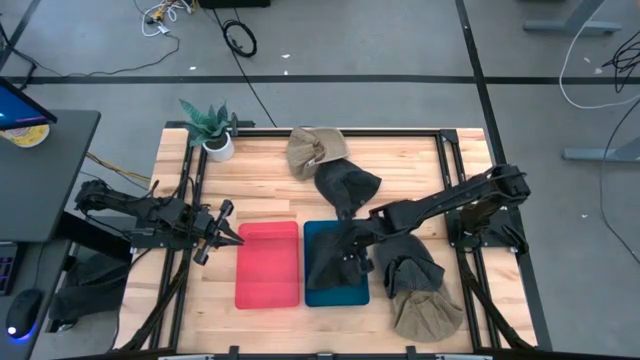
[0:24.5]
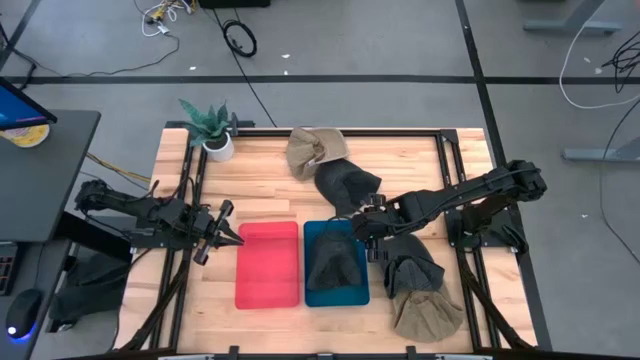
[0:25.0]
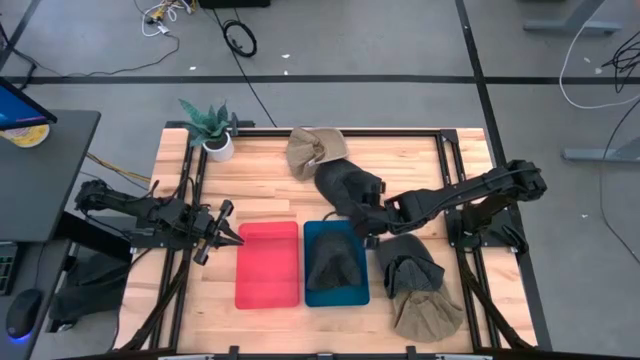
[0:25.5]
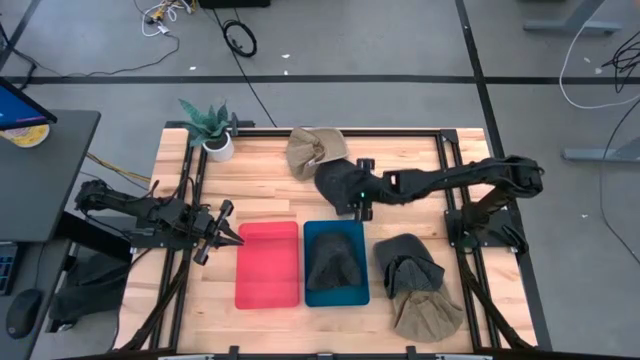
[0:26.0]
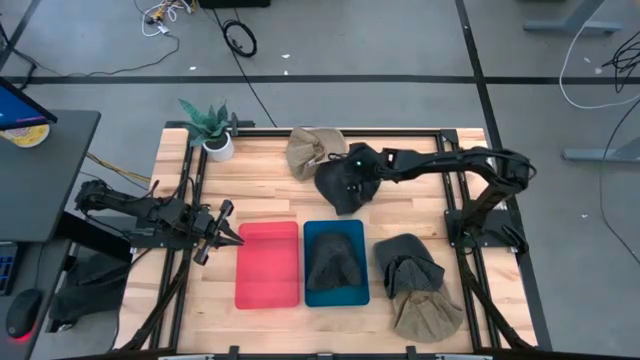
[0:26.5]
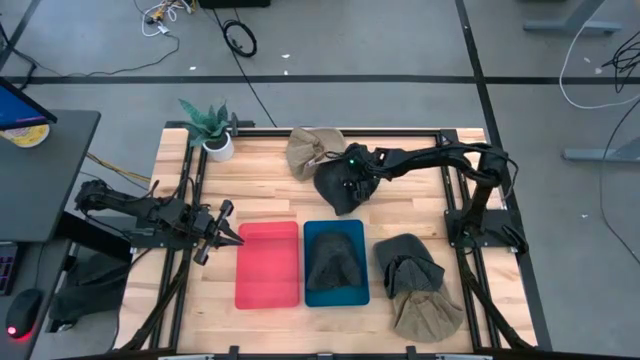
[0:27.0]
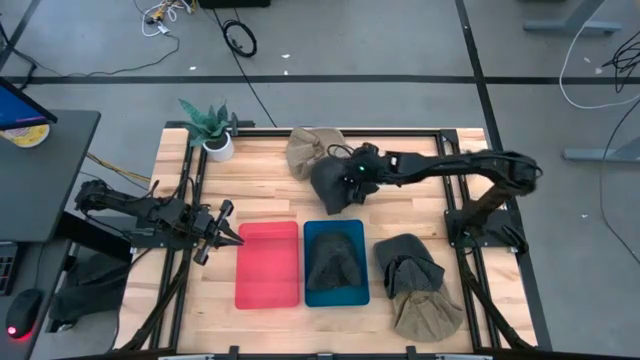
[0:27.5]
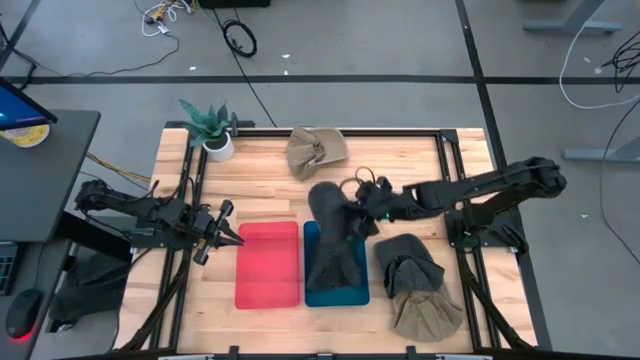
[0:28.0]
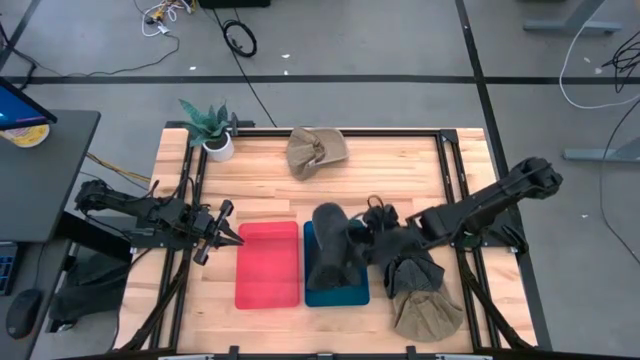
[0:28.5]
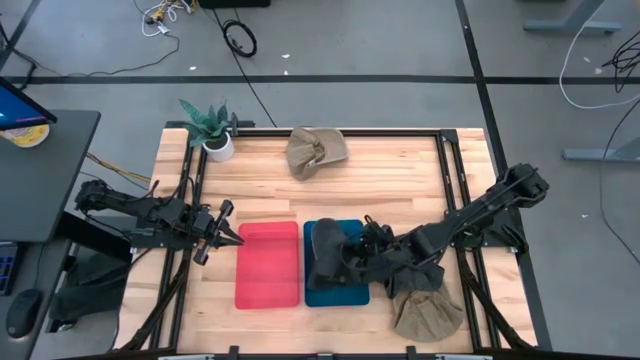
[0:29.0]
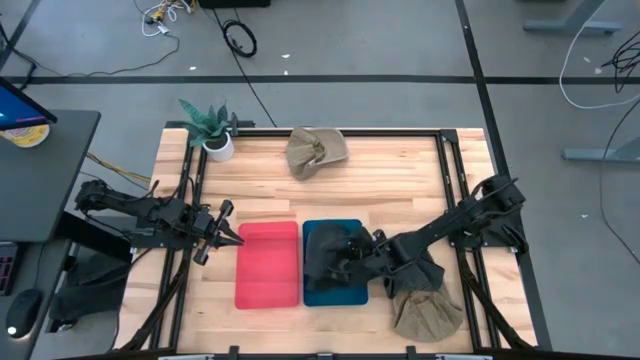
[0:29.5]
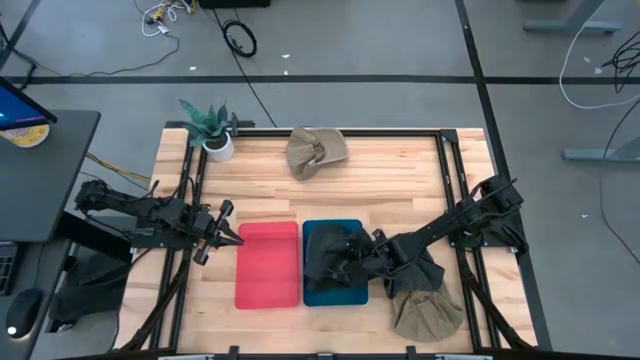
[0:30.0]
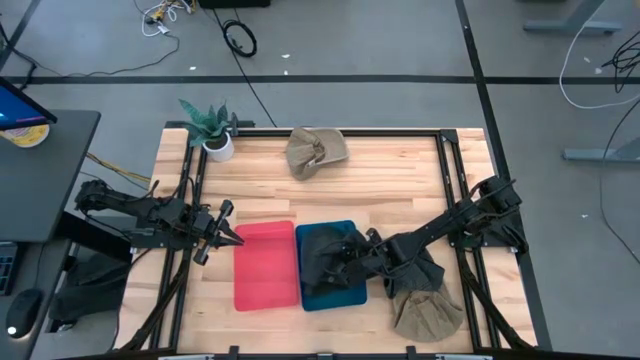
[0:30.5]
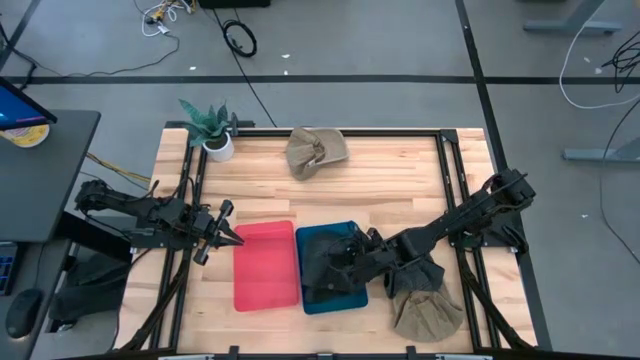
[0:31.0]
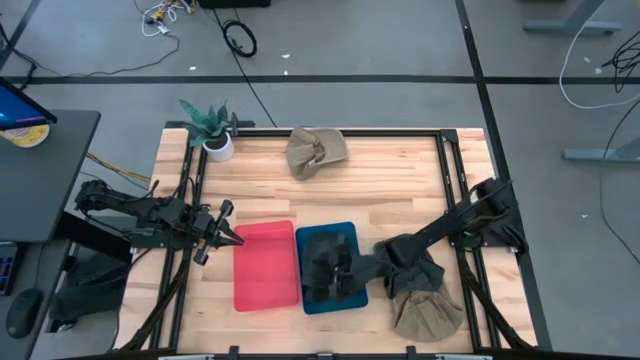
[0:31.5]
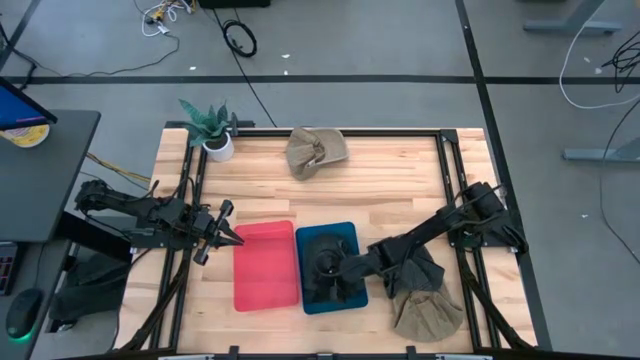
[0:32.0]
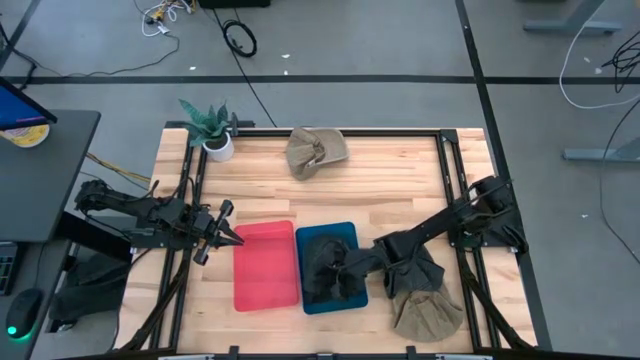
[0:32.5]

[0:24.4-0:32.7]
Task: Pick & Place hat
Put the top black cap into the blue bin

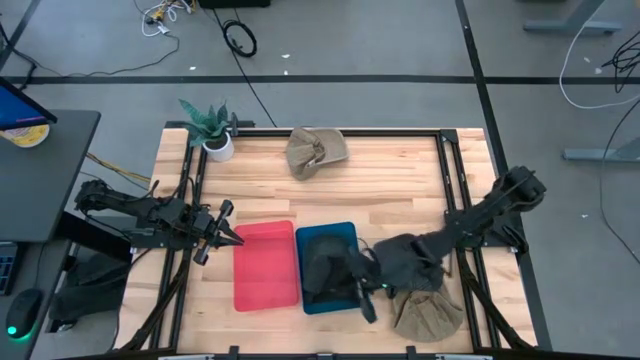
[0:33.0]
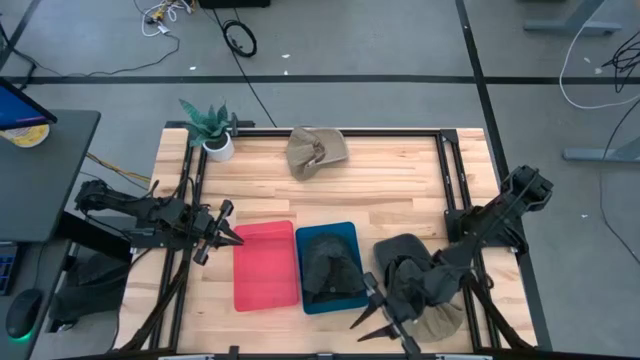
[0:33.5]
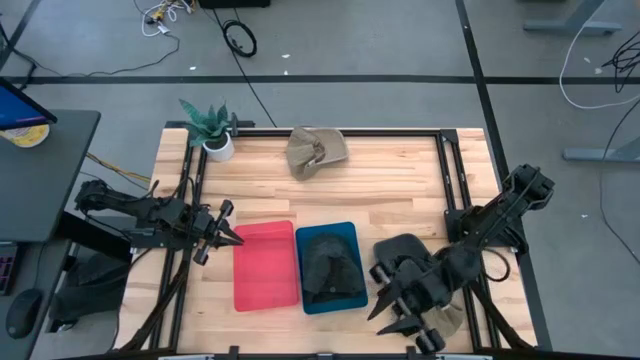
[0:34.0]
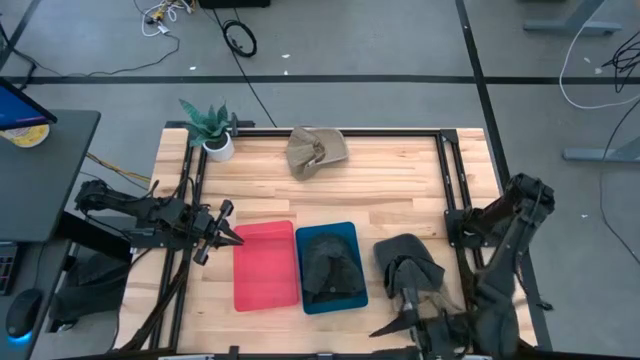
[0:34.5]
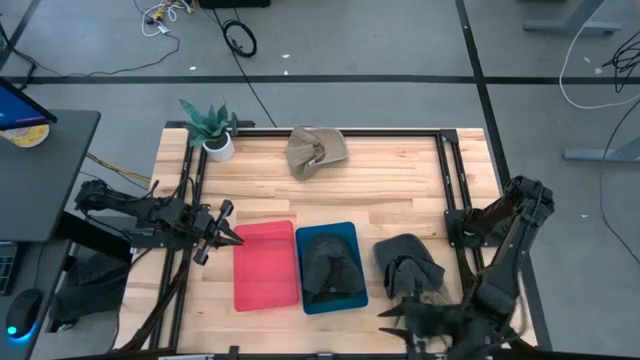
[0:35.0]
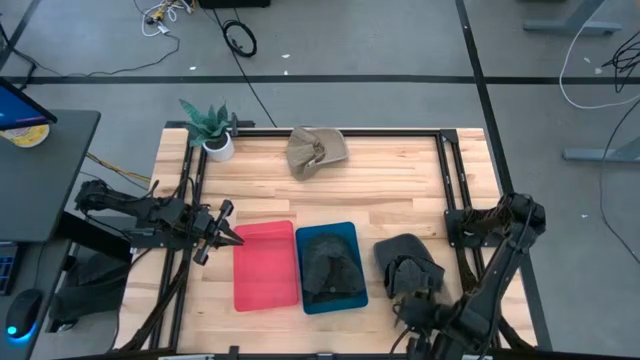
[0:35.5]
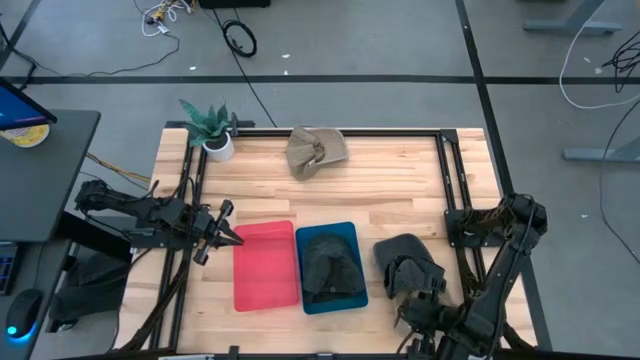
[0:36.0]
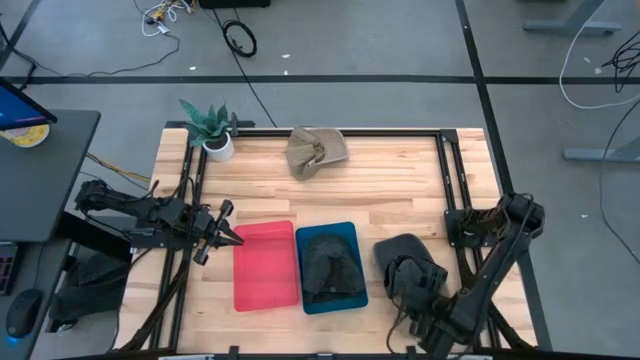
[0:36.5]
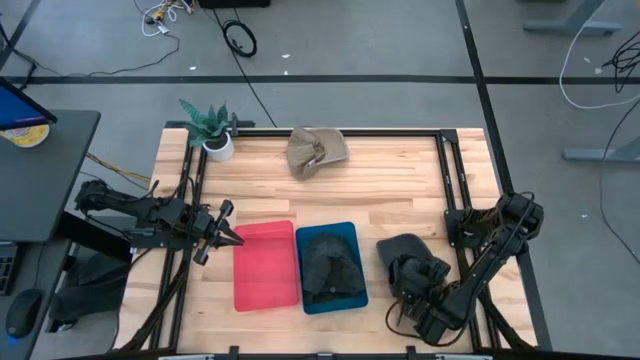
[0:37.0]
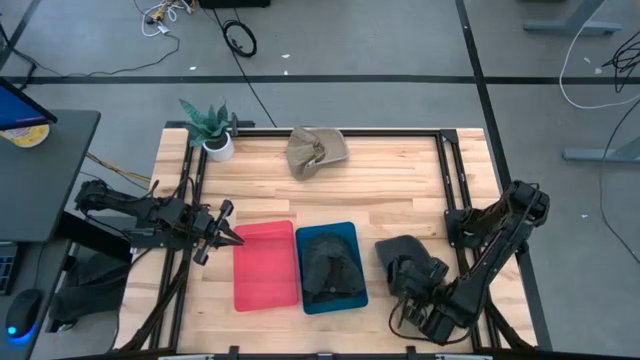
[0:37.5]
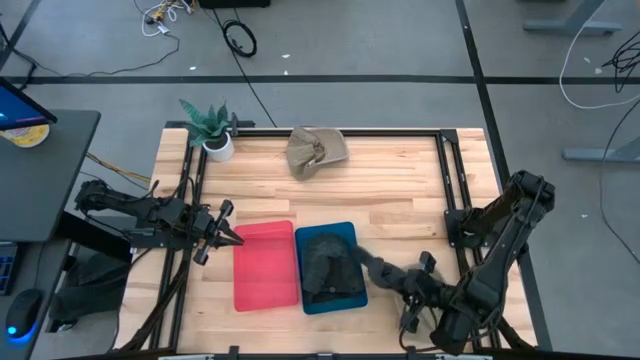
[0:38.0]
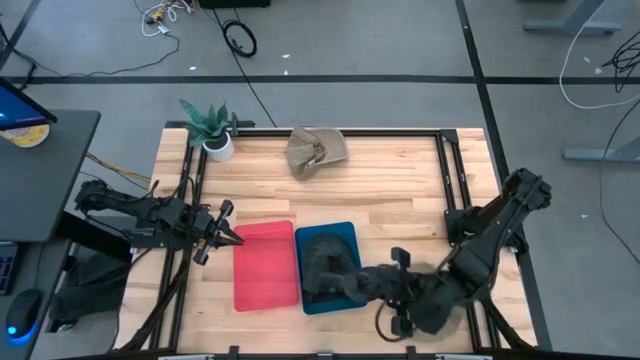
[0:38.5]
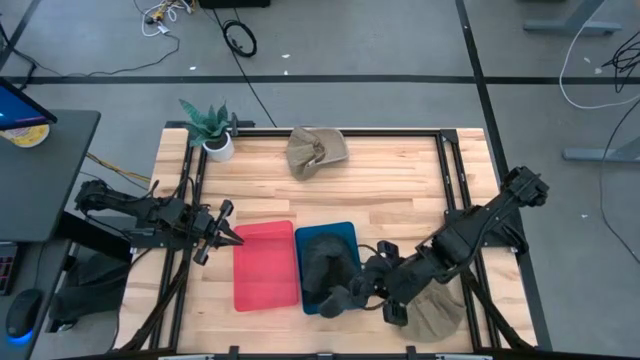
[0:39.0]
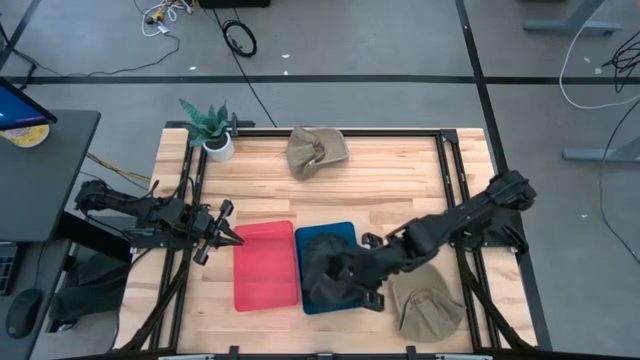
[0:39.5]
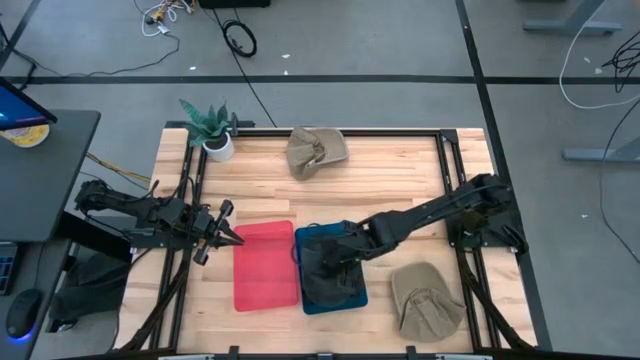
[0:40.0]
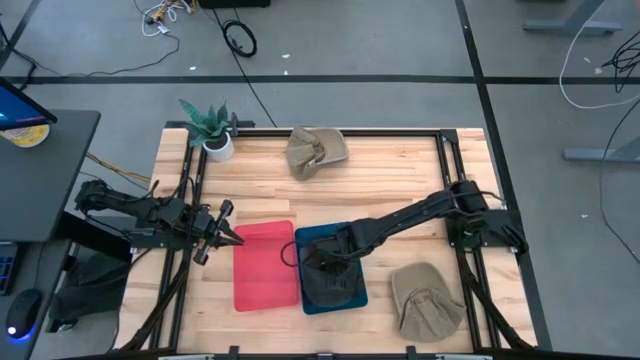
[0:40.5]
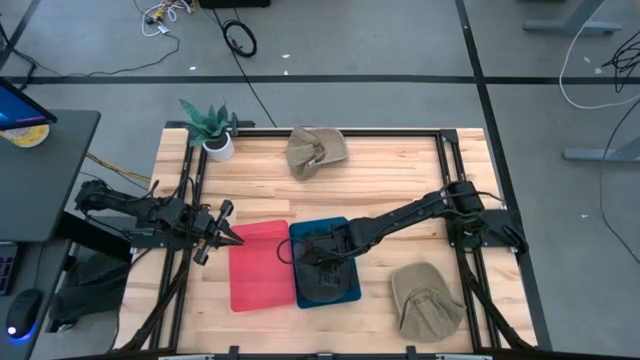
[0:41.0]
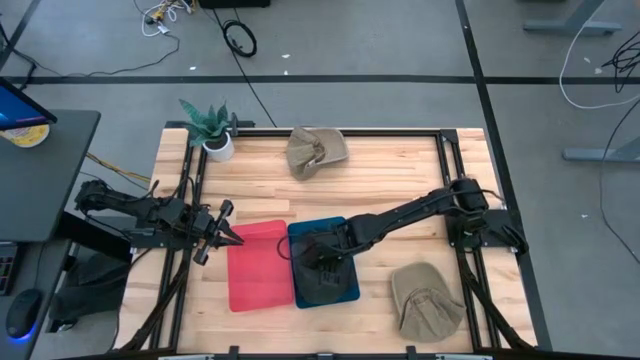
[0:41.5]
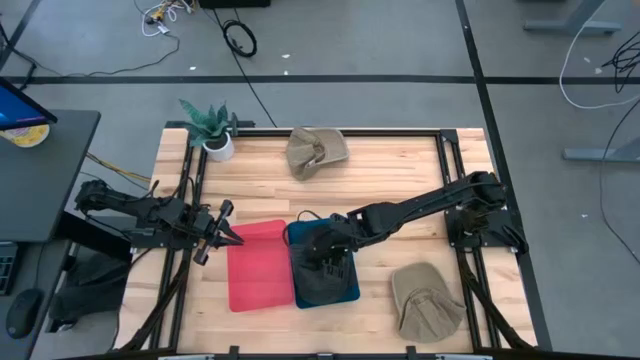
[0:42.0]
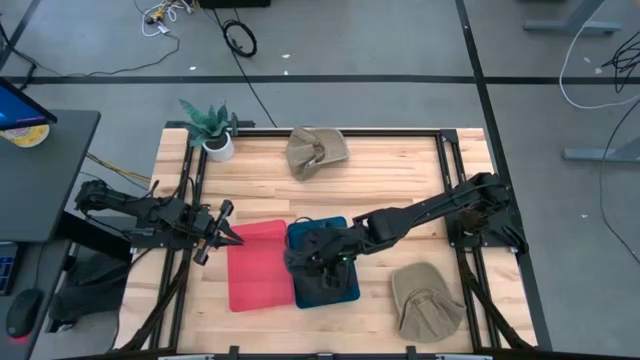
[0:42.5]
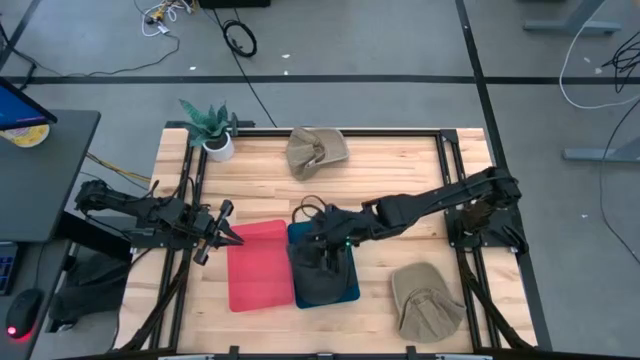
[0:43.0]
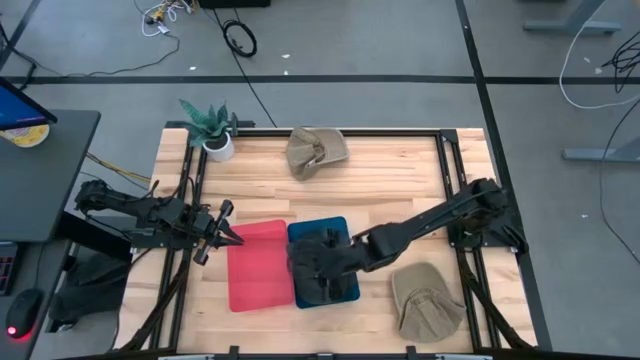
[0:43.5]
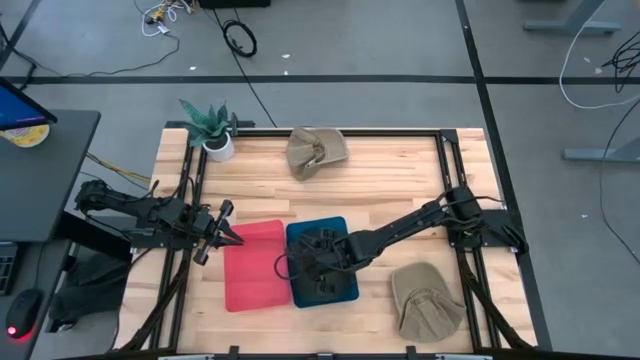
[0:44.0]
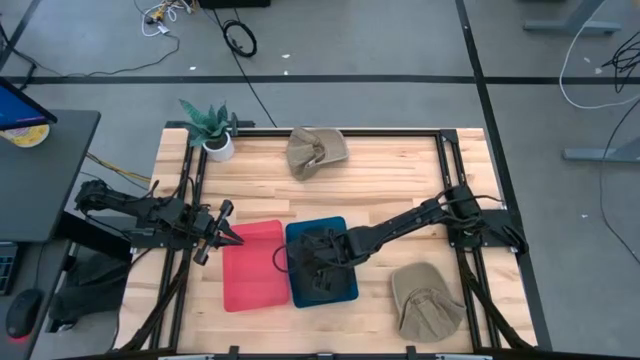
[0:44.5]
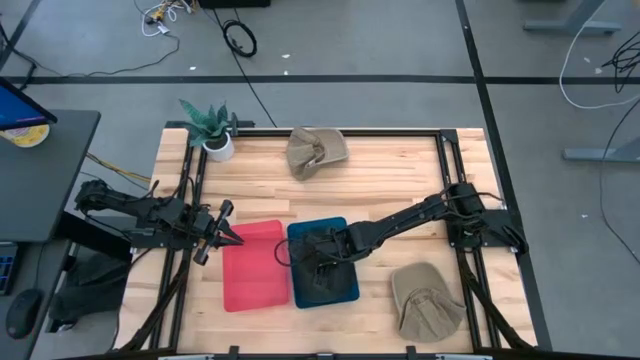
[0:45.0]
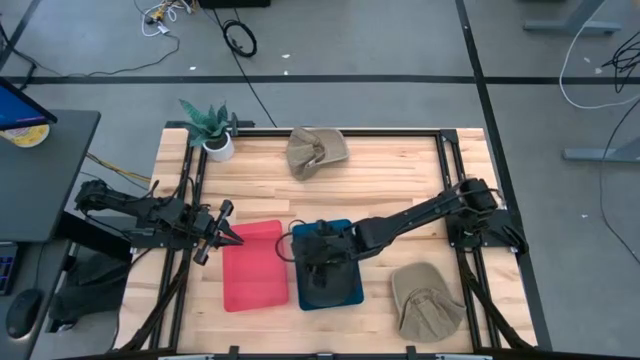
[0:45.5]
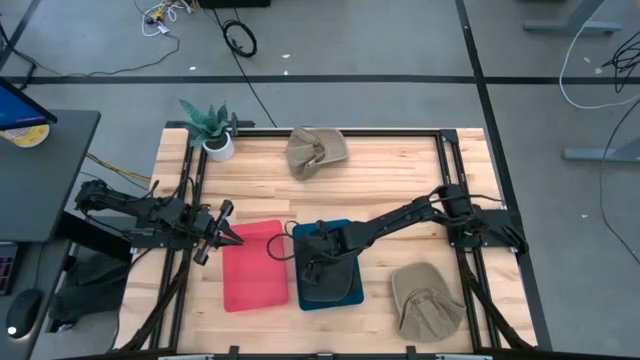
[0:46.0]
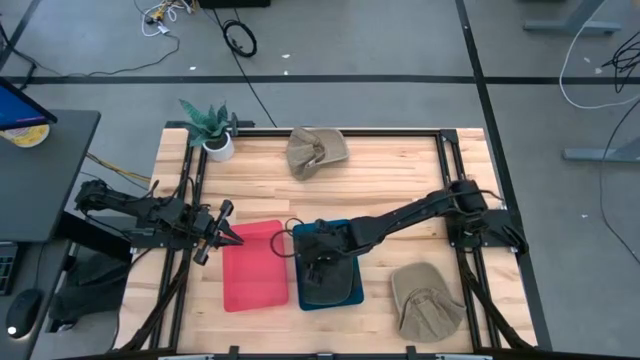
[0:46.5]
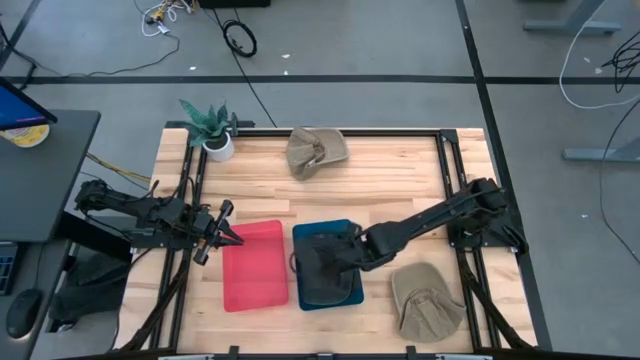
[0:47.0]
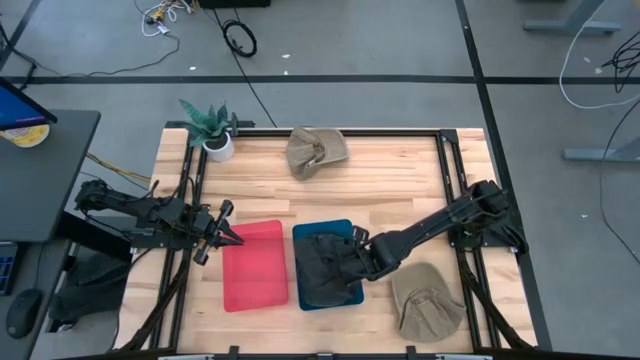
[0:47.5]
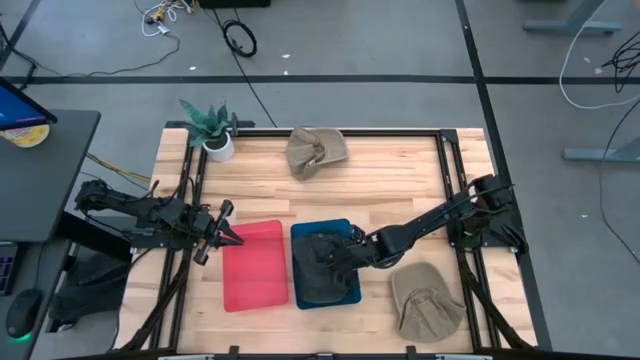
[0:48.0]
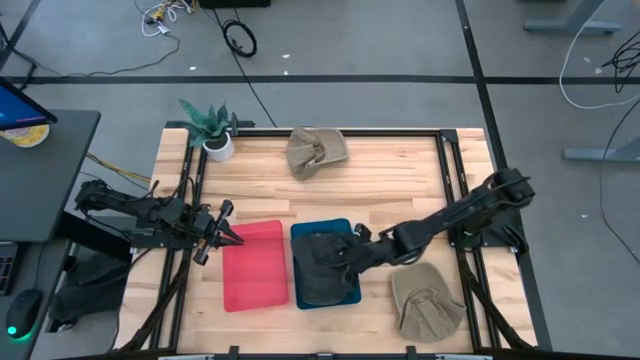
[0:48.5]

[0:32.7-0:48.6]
Put the black cap into the blue bin
